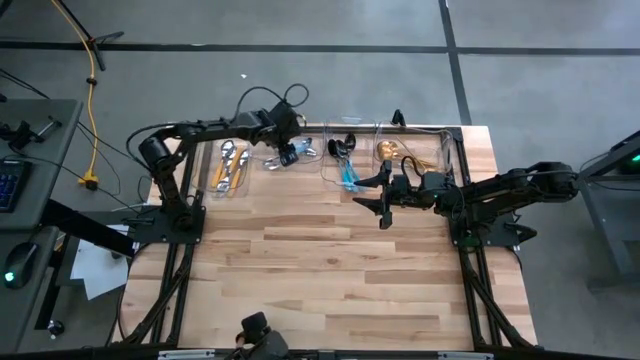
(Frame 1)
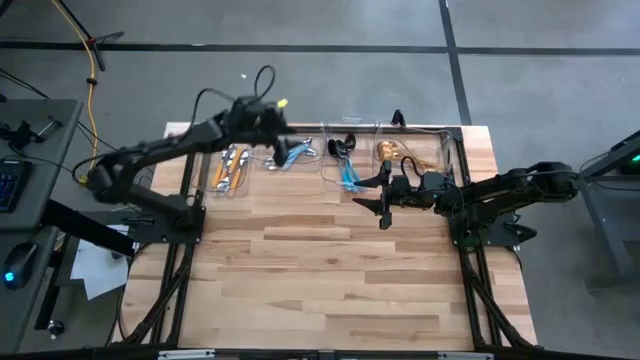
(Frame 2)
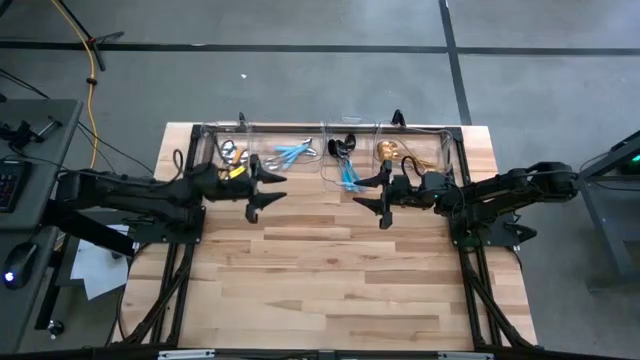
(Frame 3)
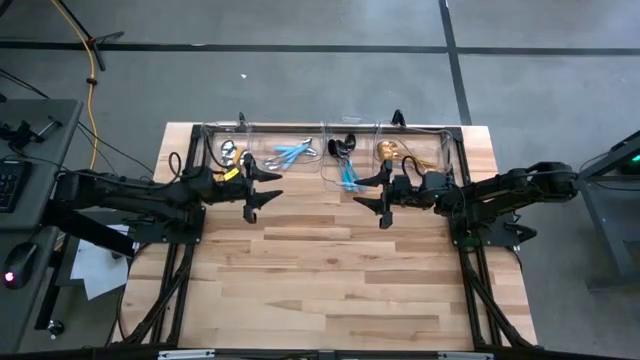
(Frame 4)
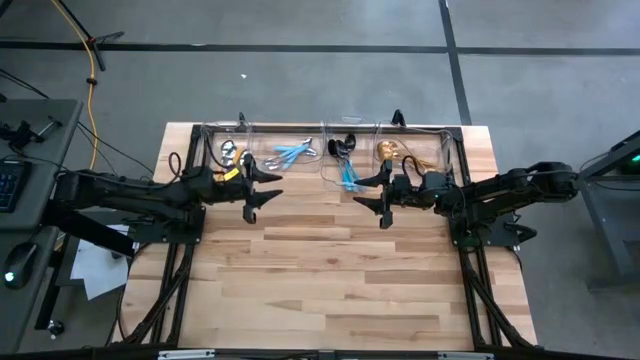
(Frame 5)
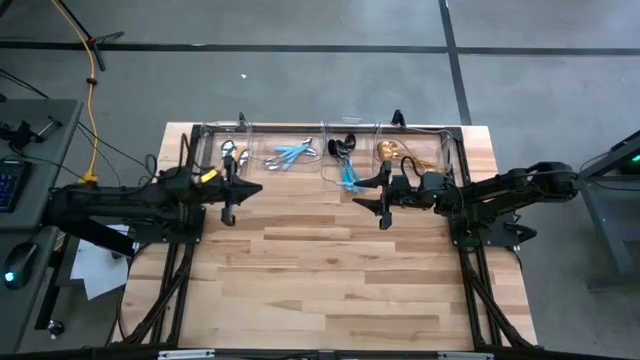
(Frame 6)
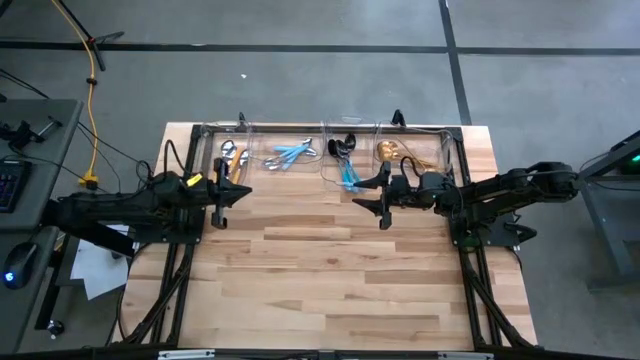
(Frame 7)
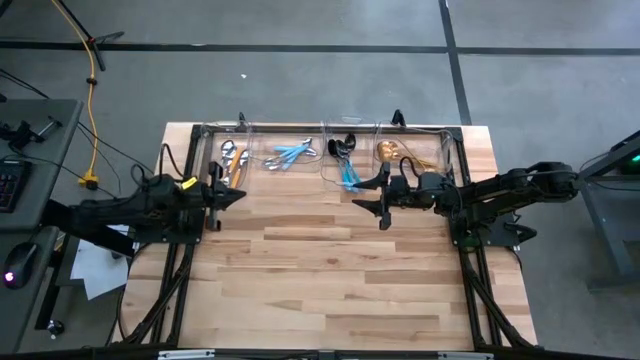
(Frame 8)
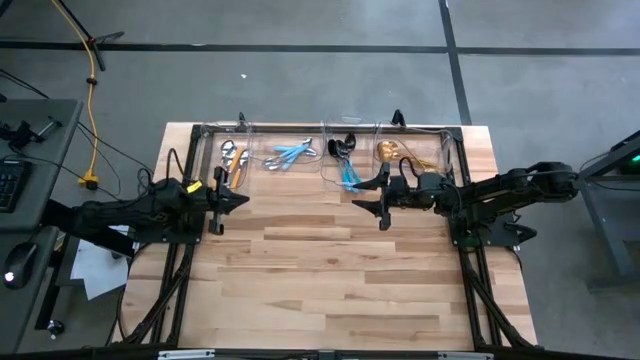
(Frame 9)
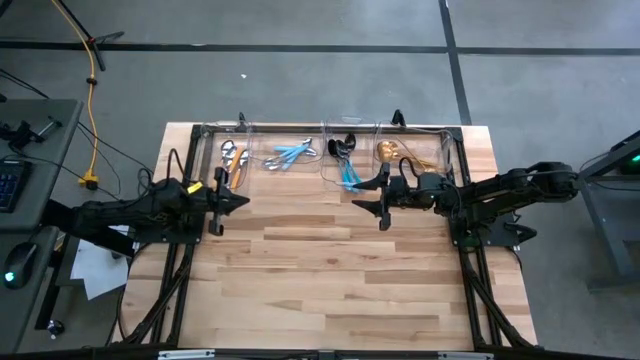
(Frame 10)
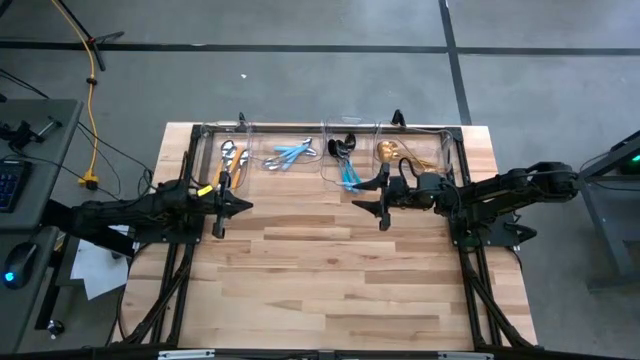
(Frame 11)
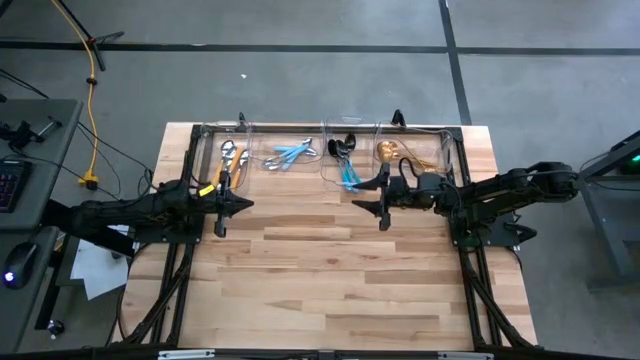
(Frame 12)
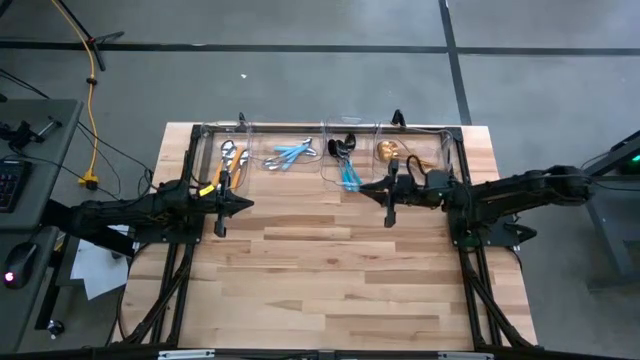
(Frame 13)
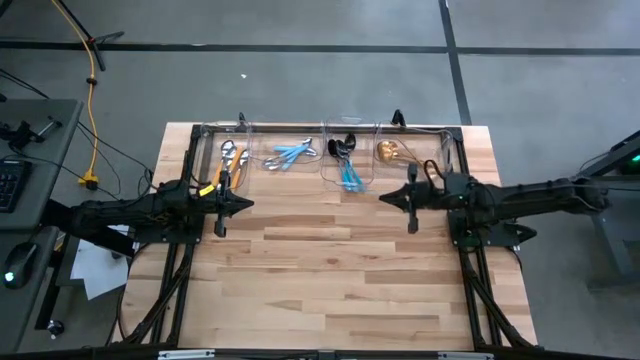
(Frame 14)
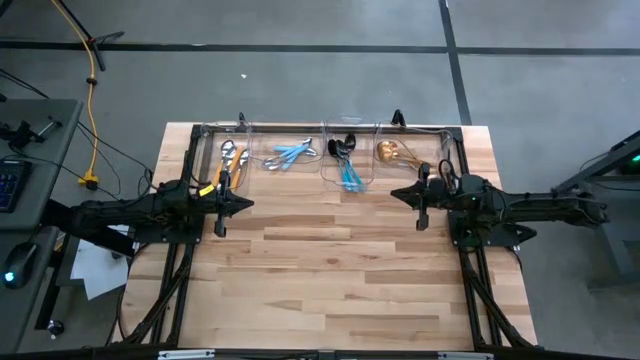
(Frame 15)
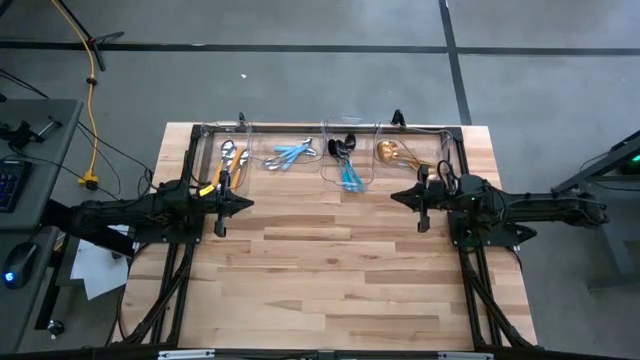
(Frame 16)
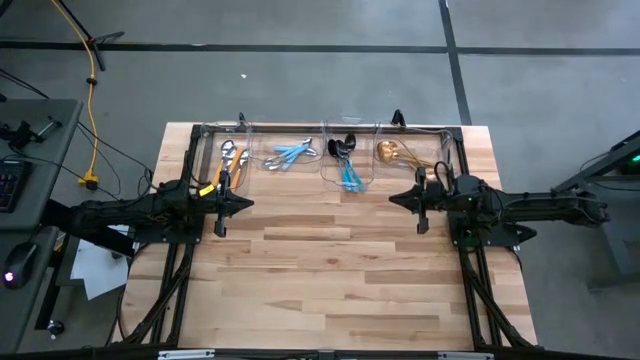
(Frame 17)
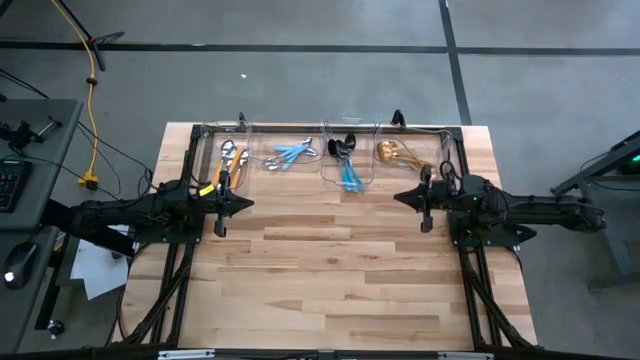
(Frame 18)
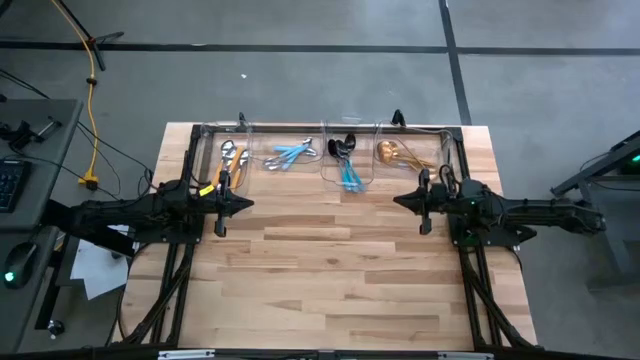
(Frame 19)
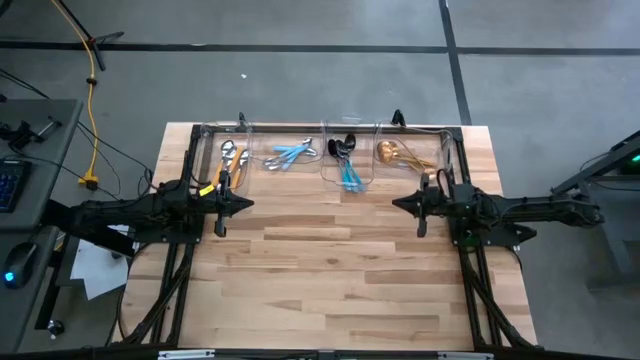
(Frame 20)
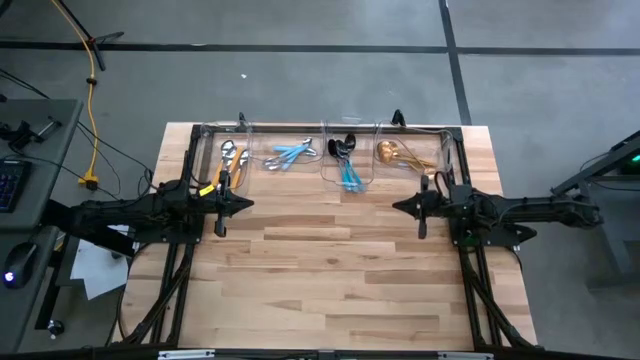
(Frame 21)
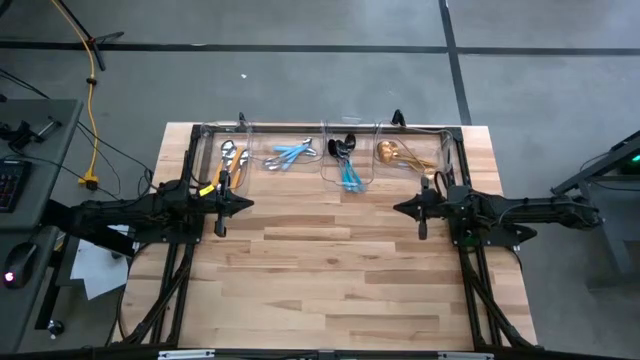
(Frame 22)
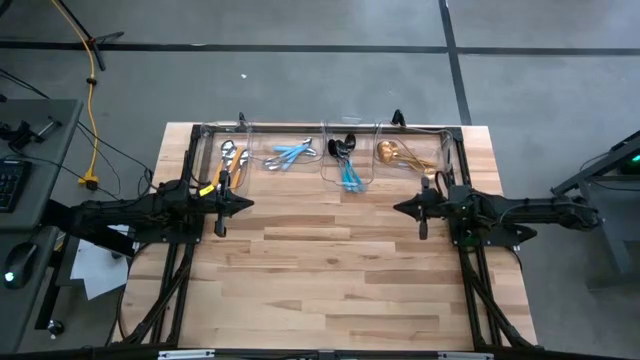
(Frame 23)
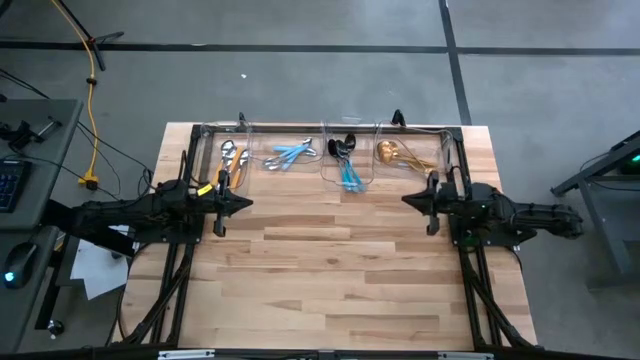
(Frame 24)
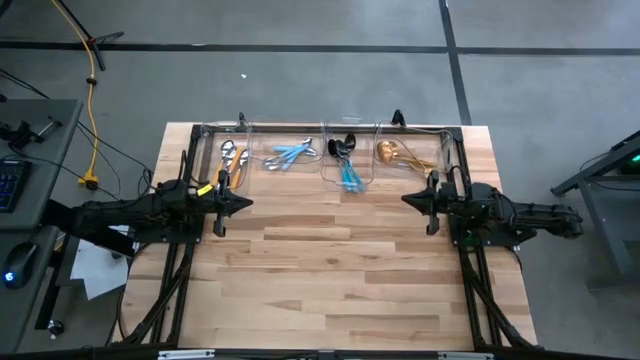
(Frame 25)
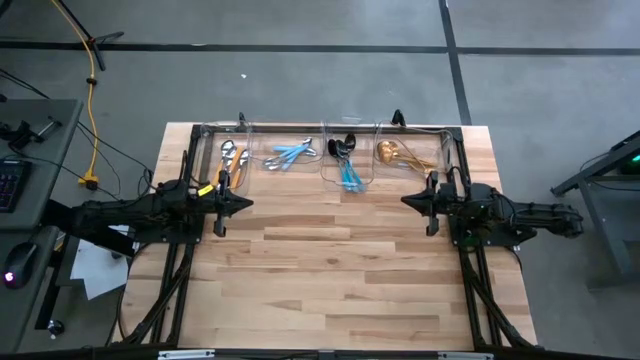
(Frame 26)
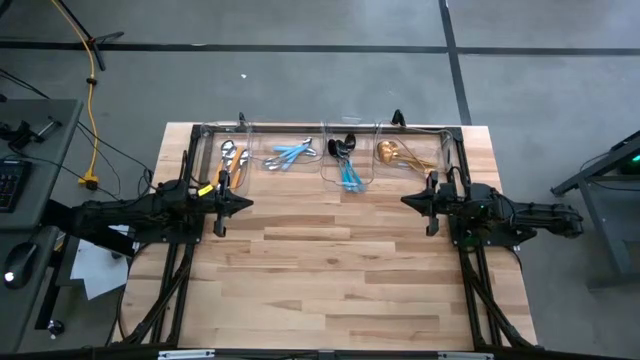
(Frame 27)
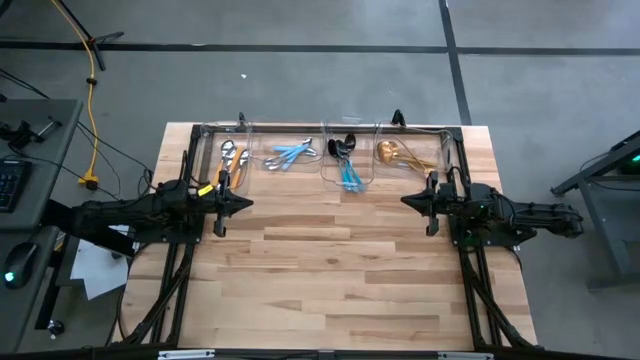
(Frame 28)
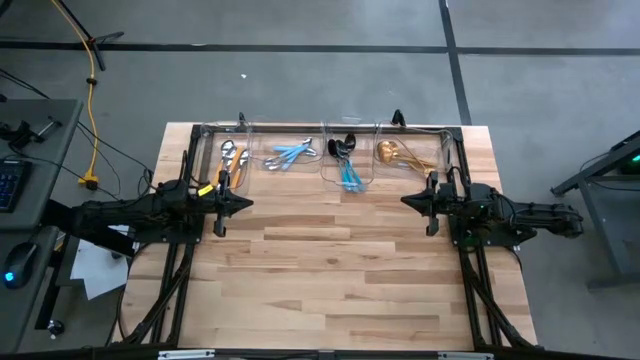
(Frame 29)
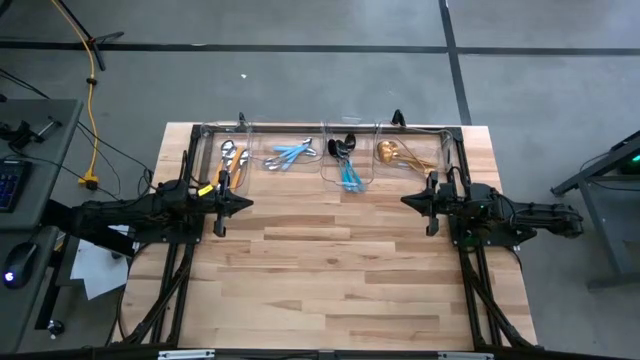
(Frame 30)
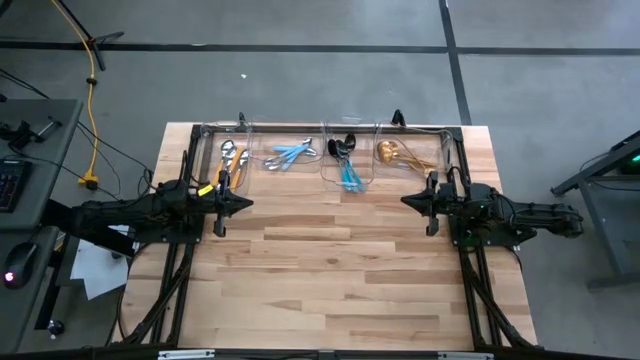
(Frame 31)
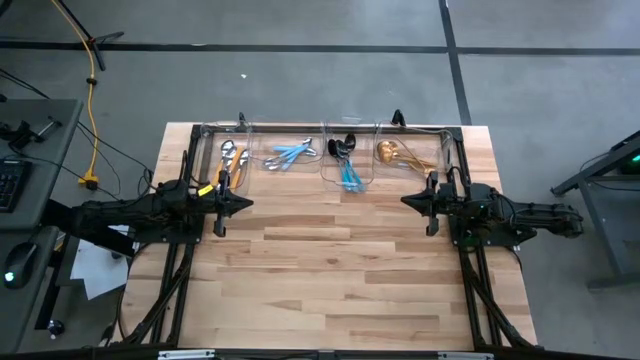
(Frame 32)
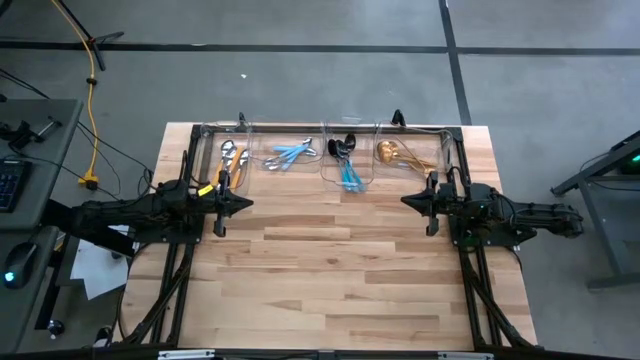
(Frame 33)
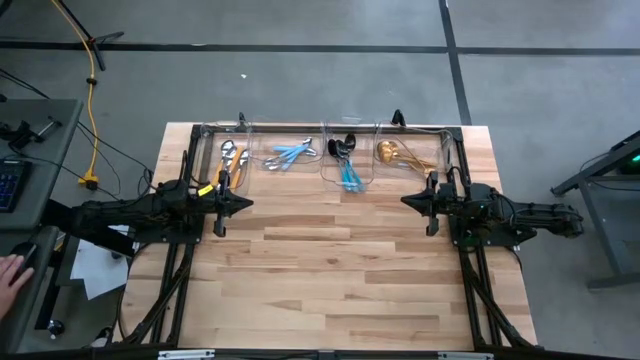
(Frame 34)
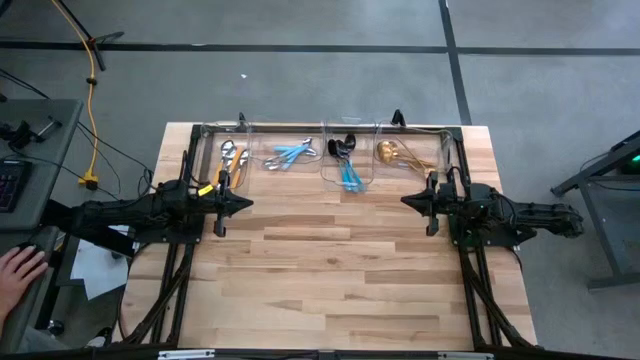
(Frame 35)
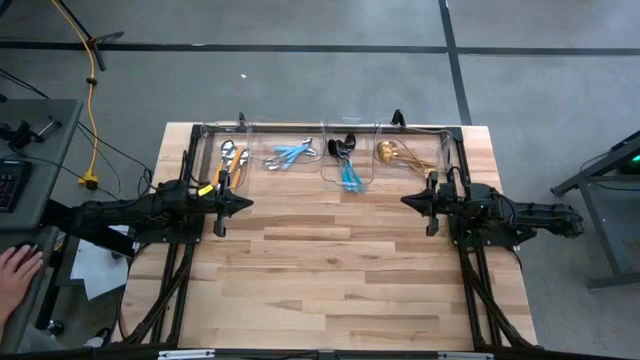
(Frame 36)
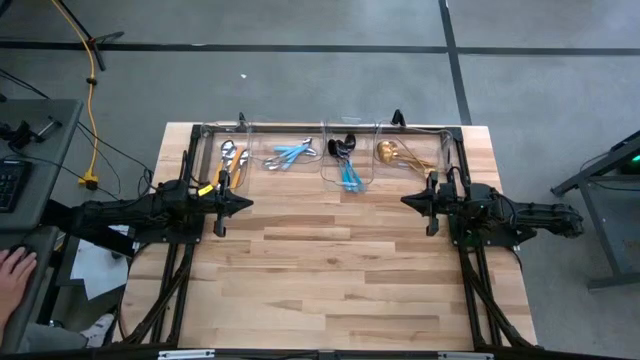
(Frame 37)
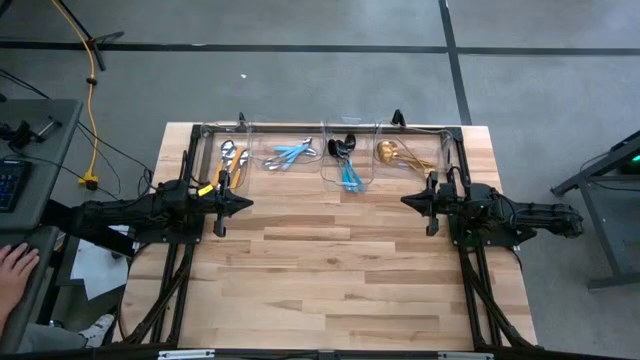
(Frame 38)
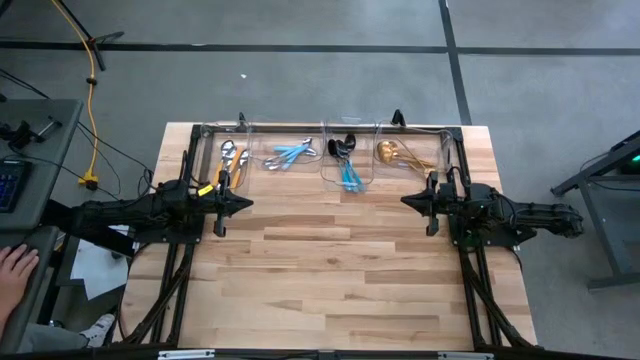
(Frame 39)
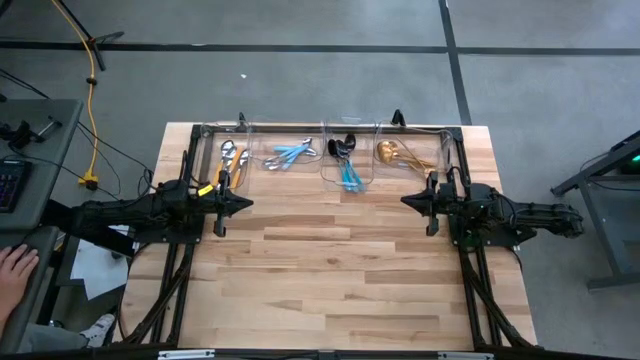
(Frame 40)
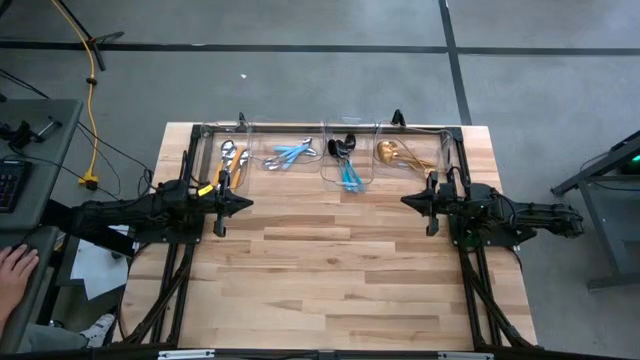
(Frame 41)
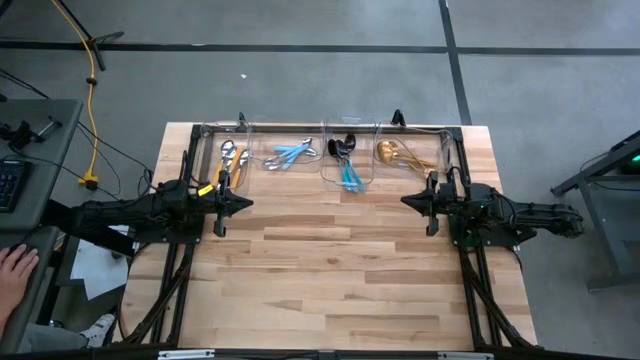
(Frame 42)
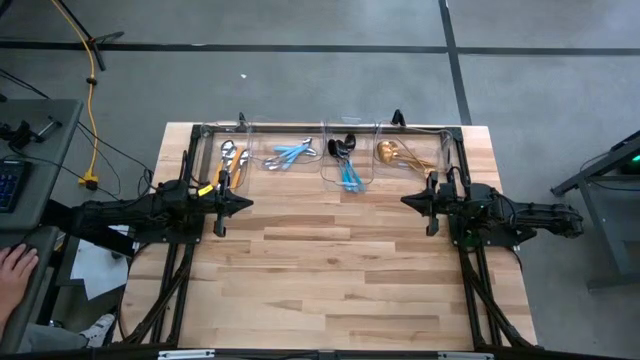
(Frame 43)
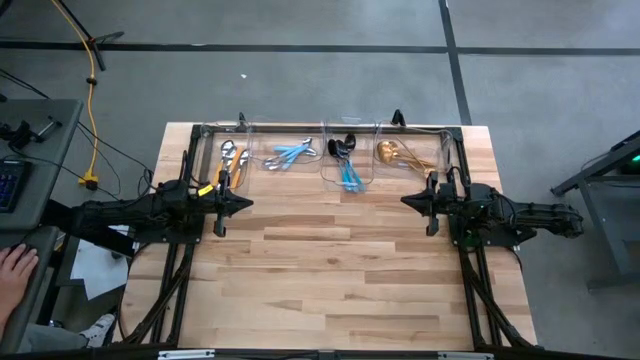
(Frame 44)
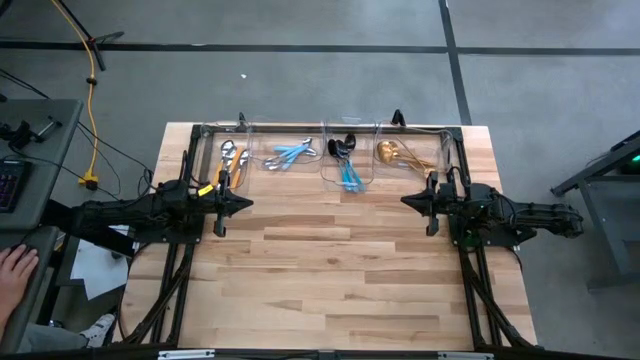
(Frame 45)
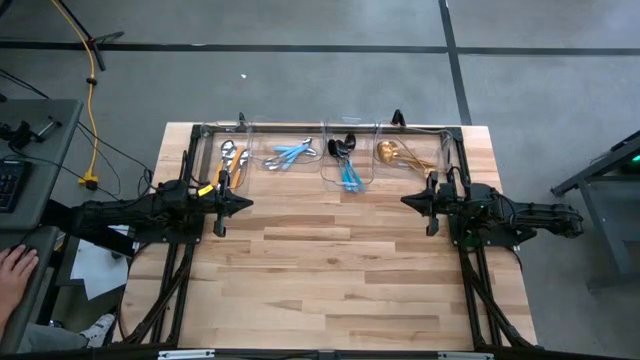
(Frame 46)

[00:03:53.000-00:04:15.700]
Task: Sort silverware by color (type)
Return to Home Position
